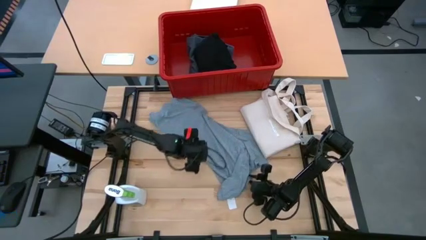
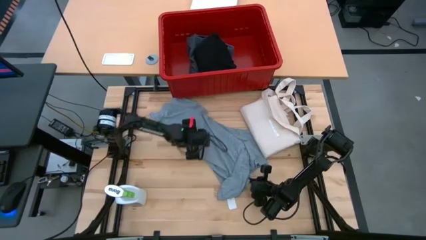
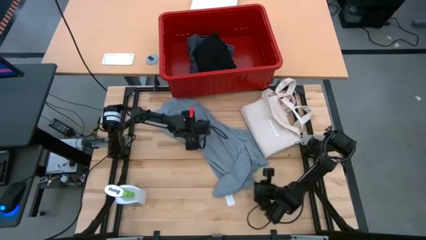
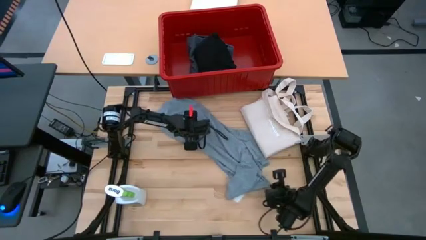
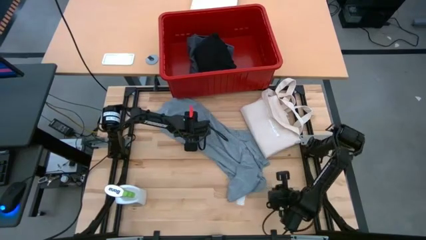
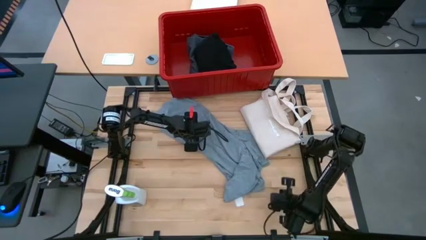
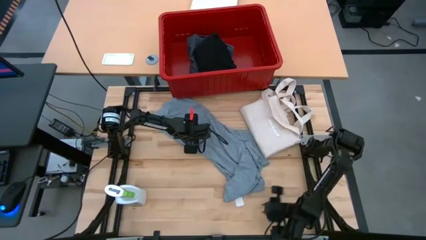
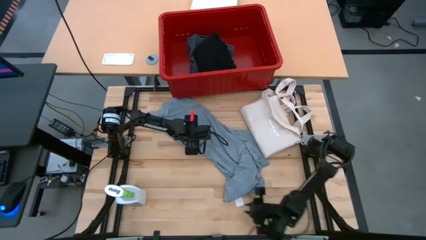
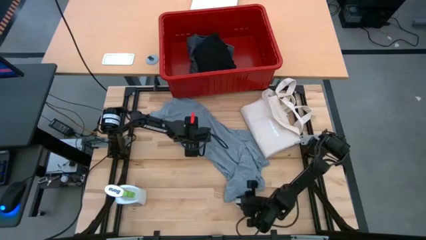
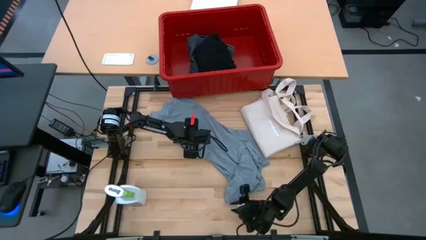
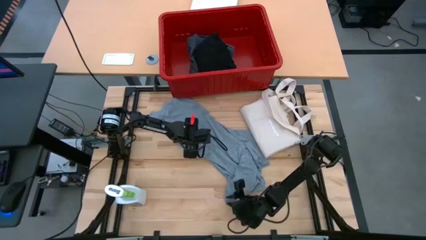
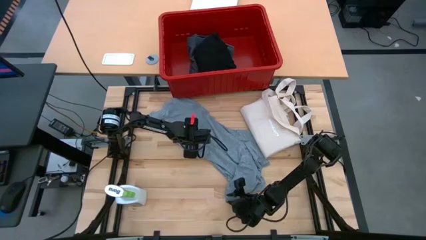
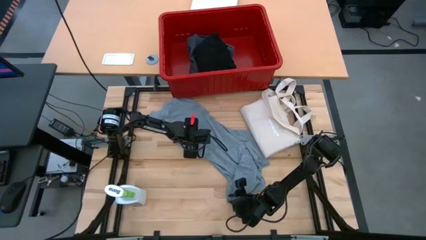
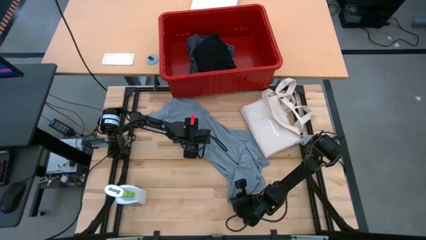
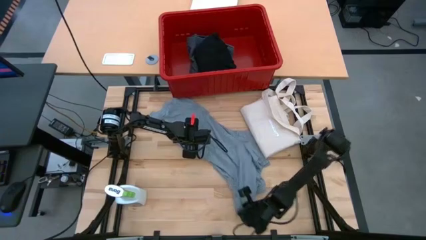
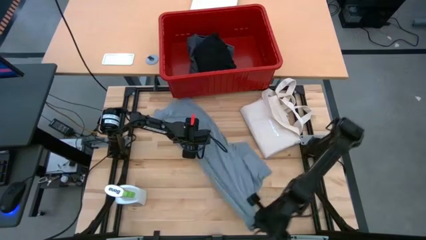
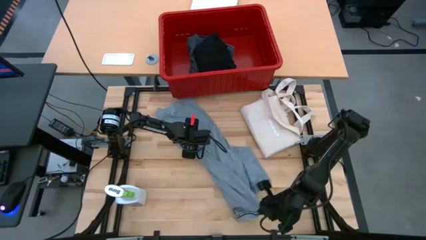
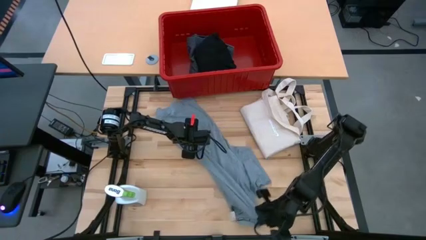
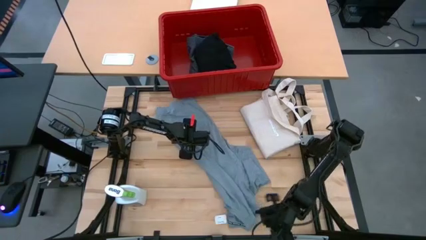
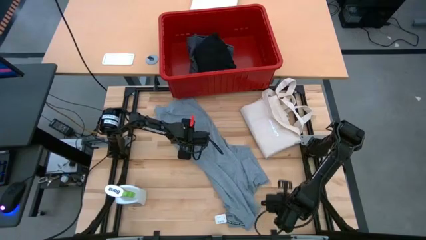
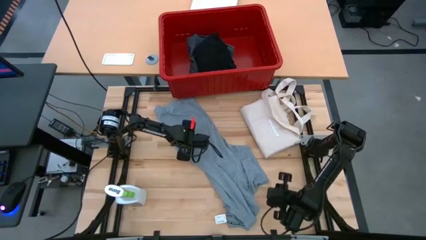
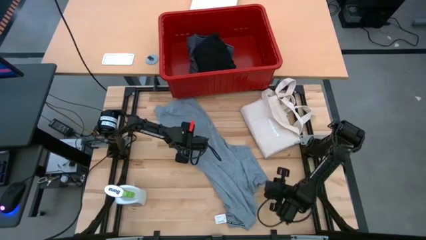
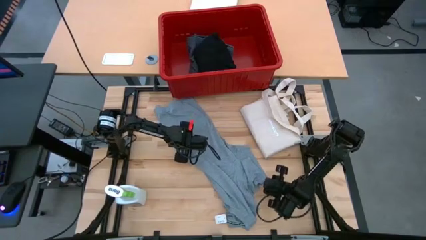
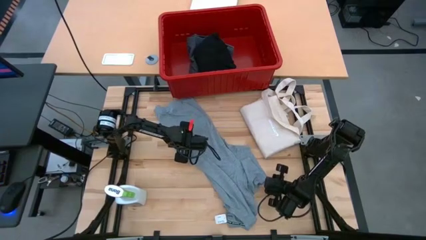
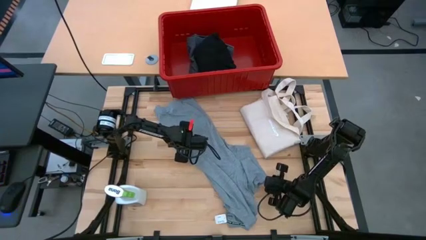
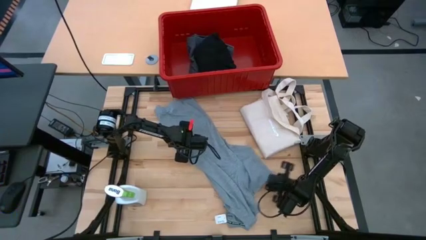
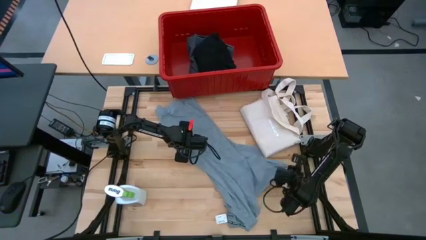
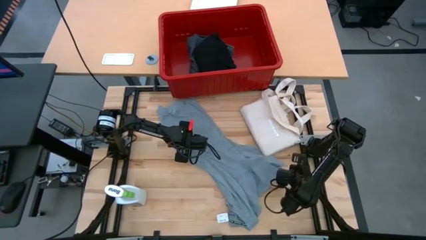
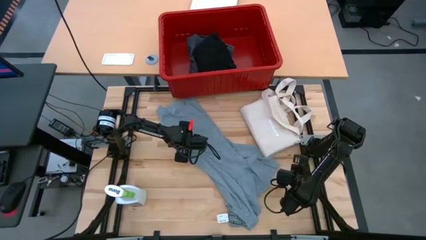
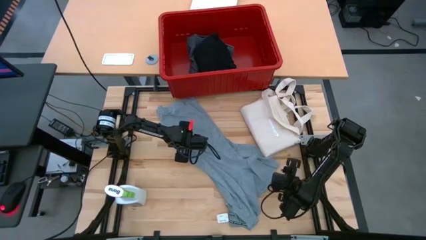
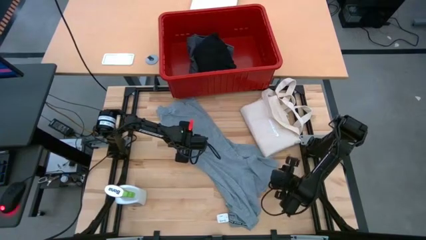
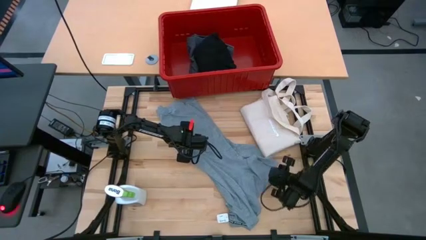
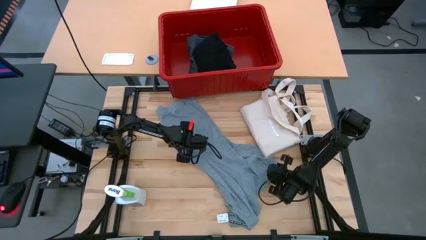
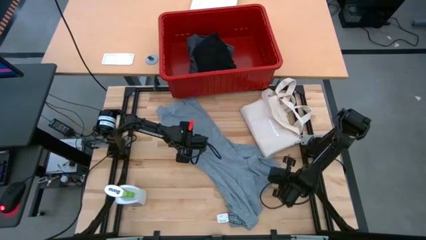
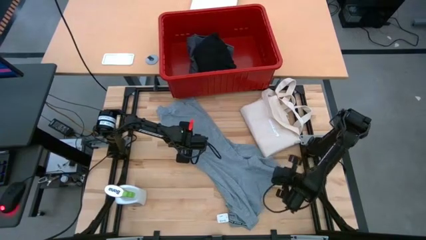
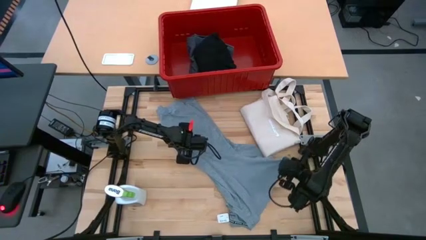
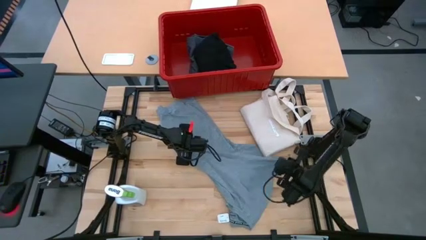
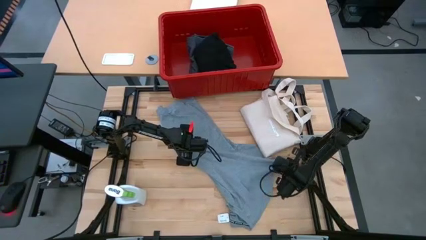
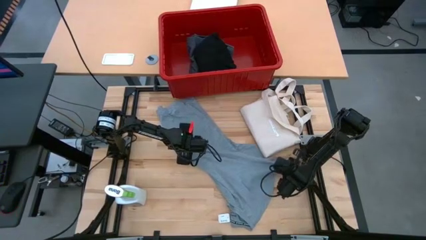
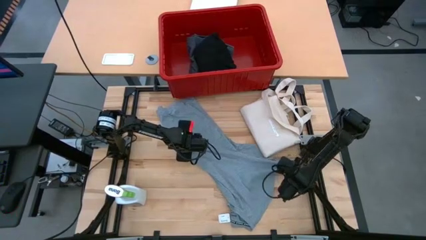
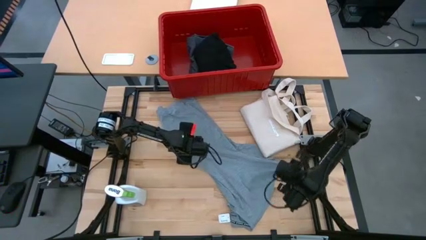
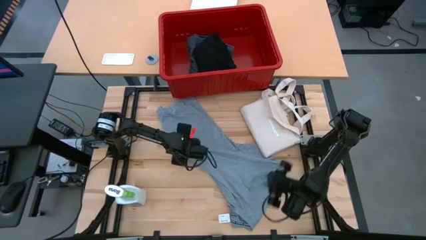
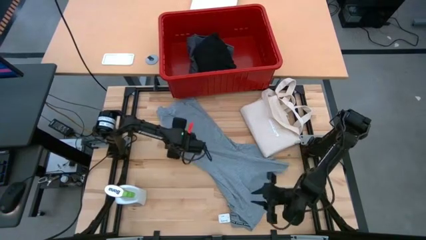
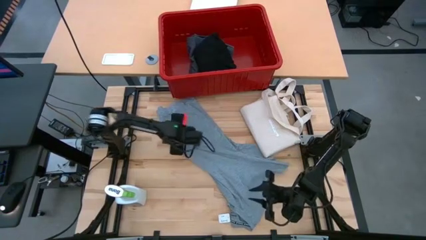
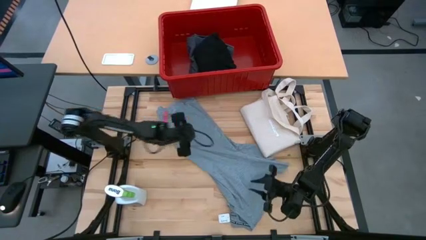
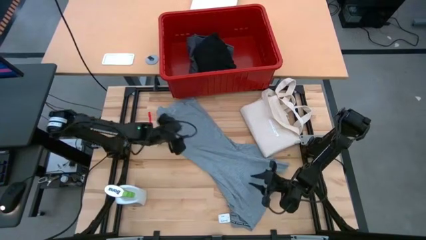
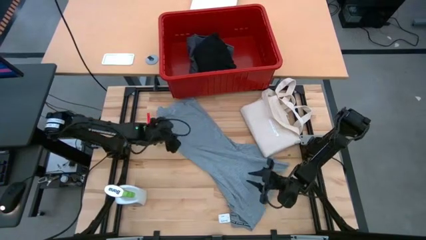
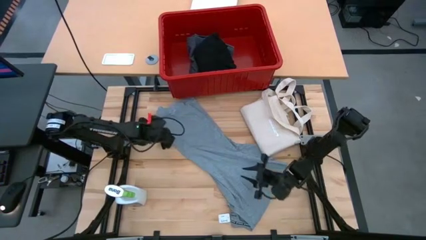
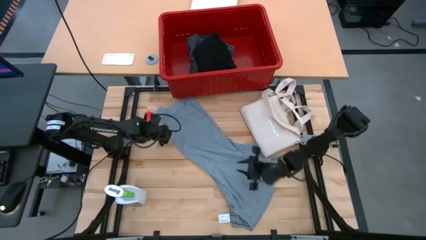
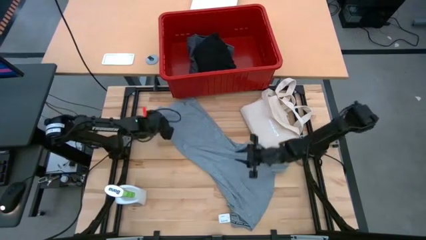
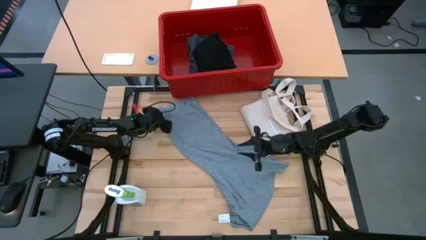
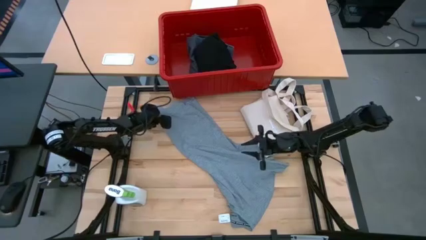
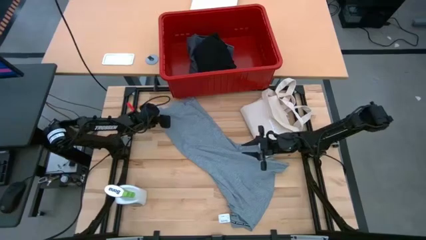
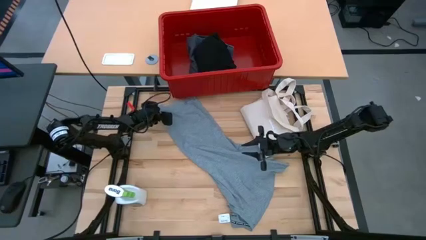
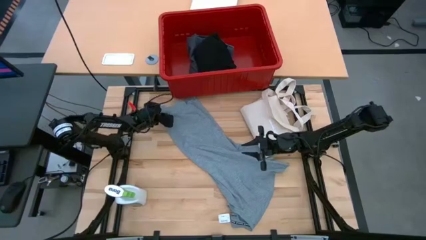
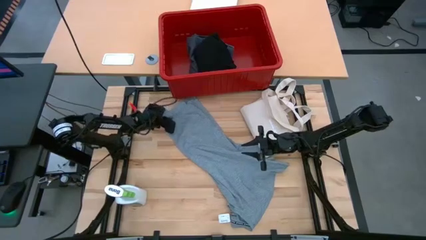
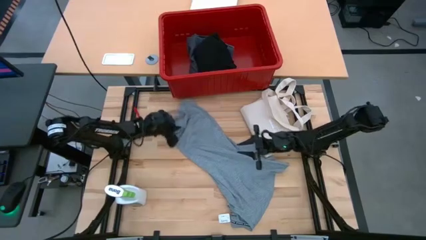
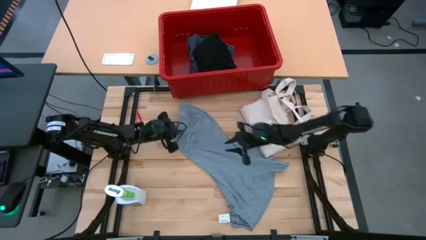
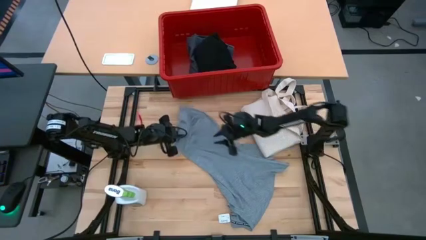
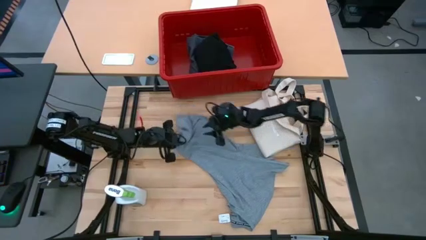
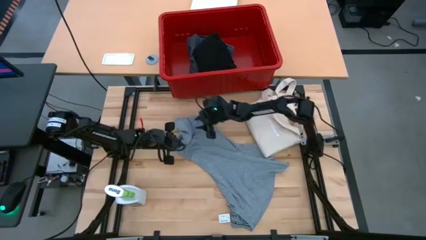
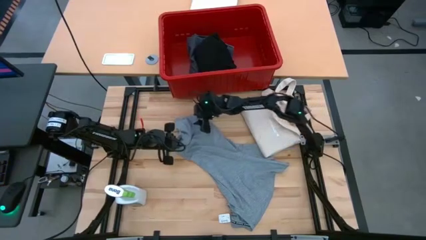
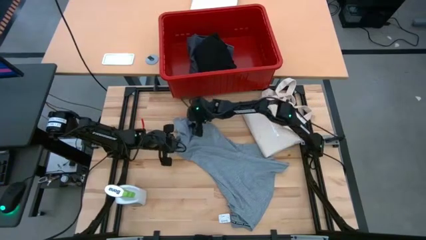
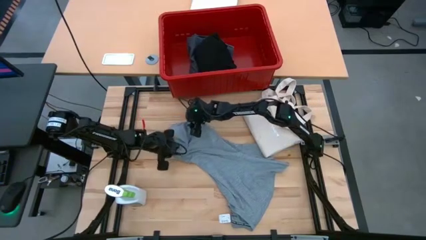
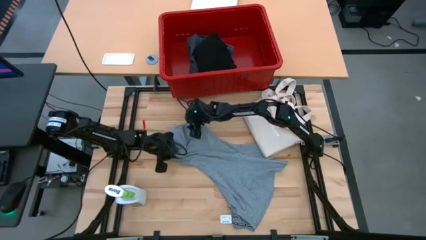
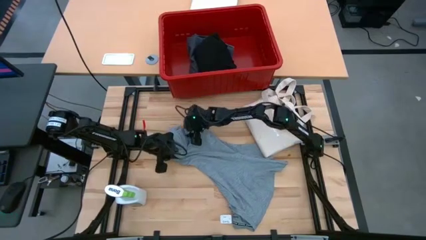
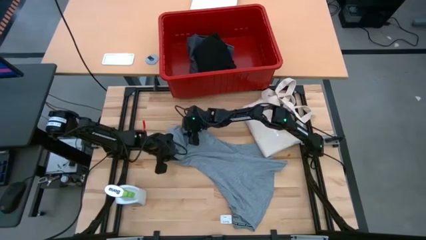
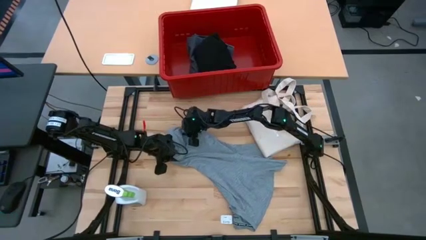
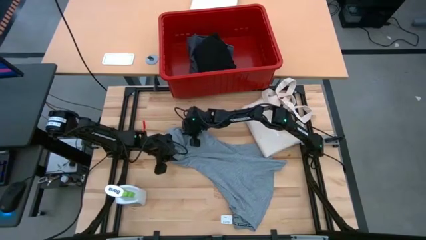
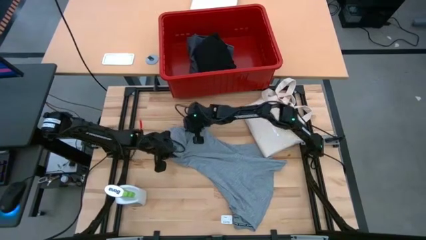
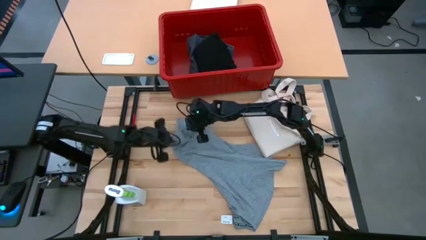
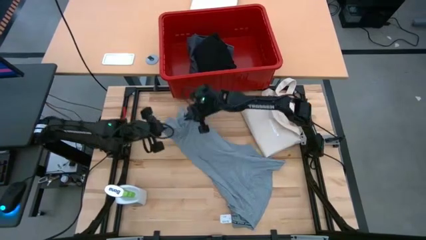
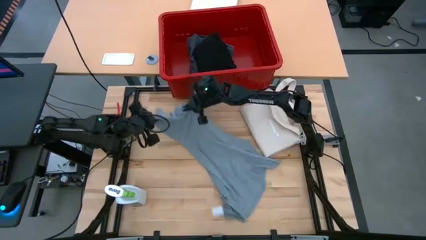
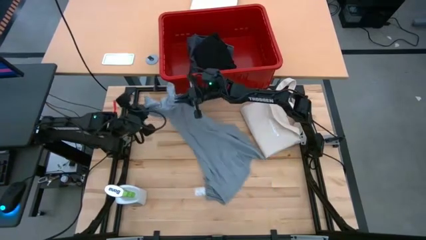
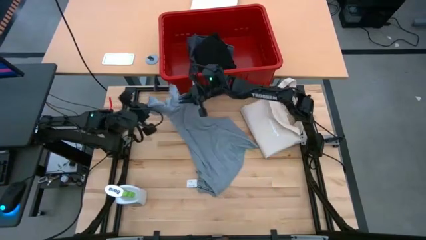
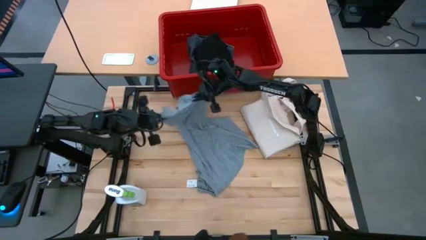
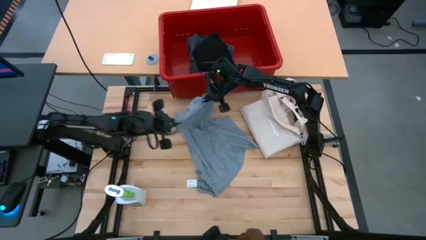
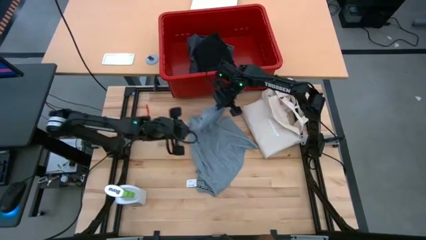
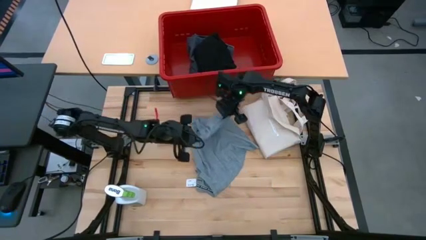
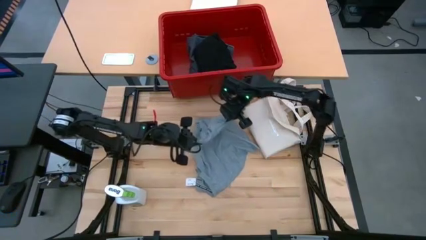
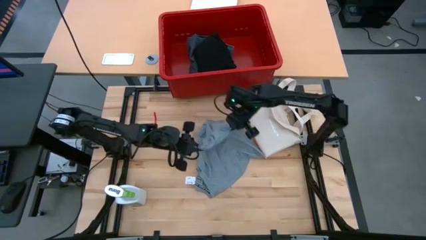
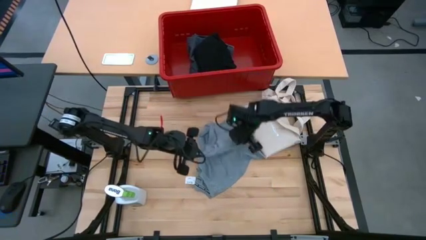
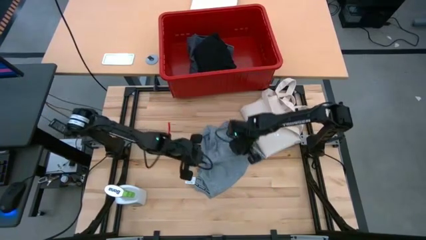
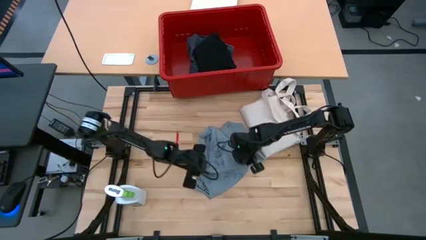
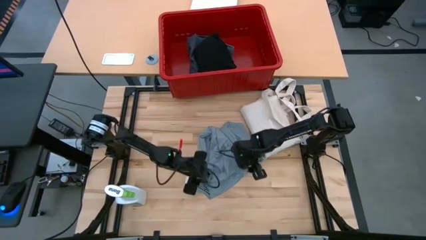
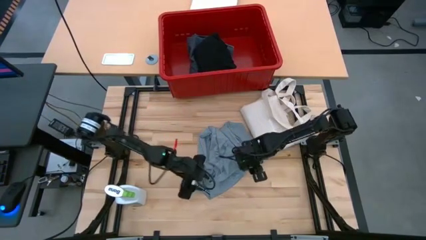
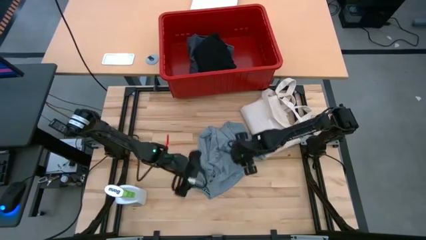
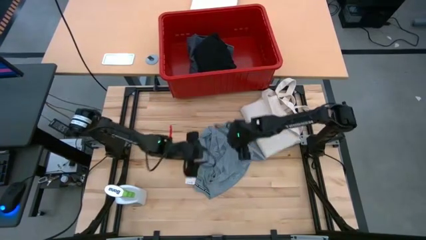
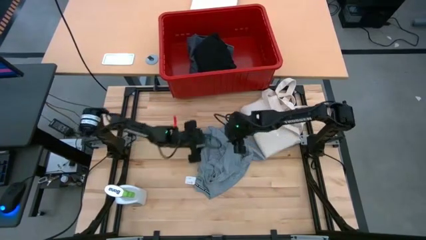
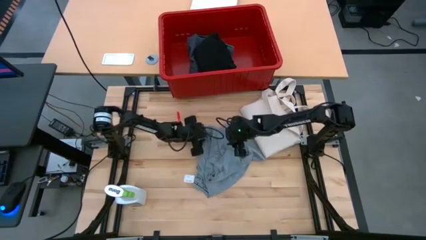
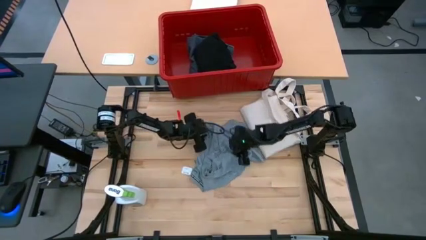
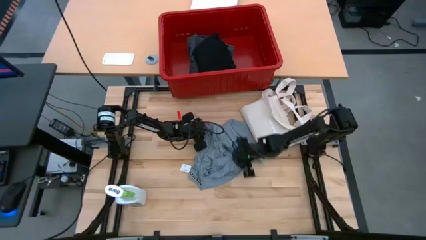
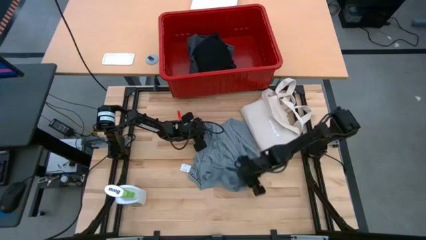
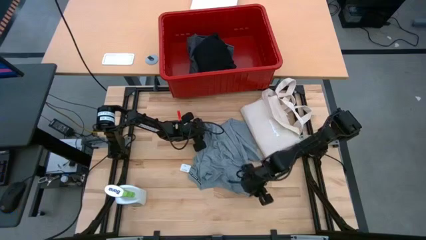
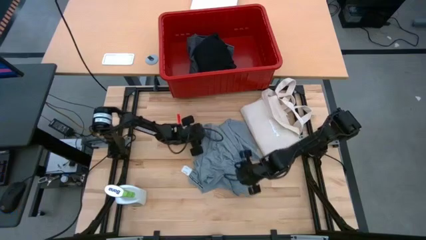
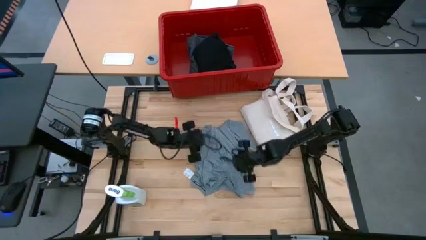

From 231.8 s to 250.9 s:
Task: Fold Laundry from Bin
Fold the gray shirt
